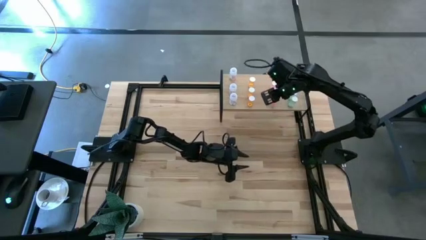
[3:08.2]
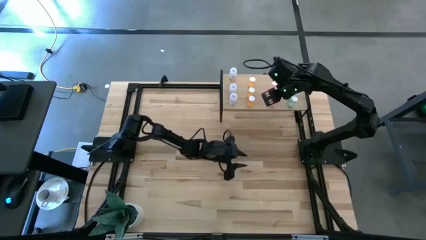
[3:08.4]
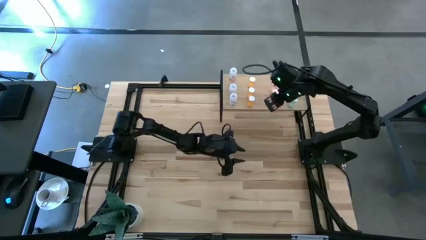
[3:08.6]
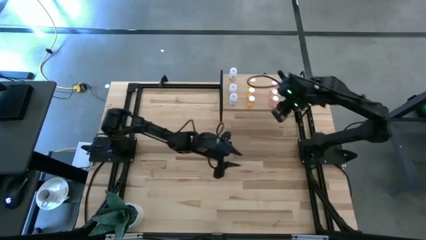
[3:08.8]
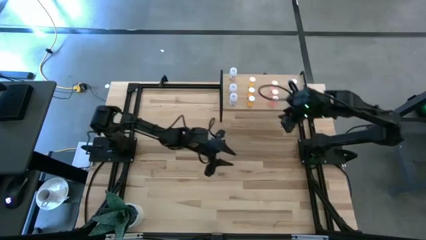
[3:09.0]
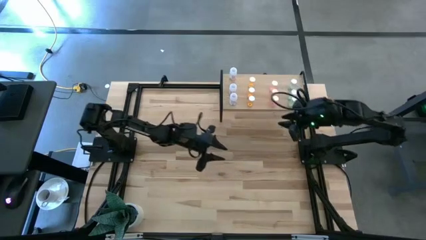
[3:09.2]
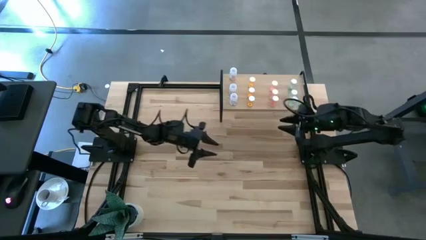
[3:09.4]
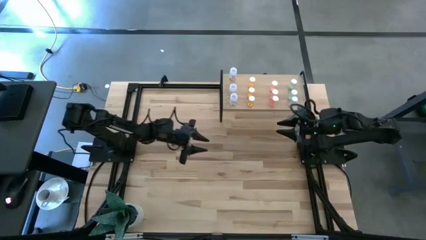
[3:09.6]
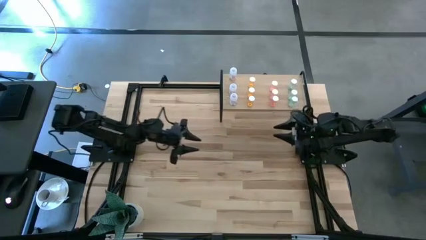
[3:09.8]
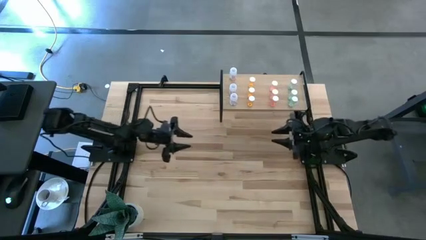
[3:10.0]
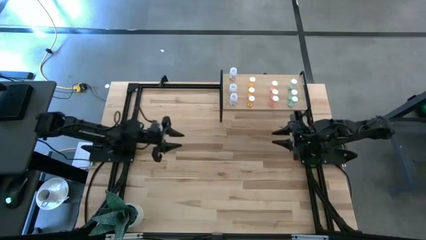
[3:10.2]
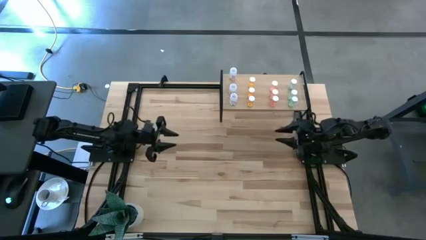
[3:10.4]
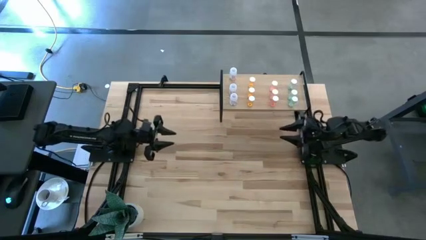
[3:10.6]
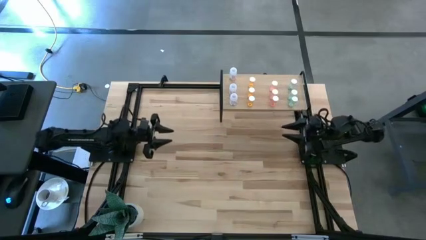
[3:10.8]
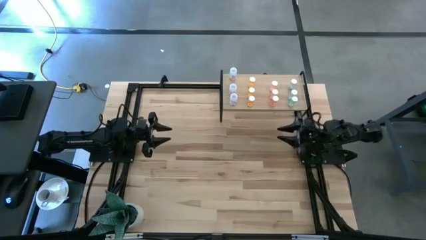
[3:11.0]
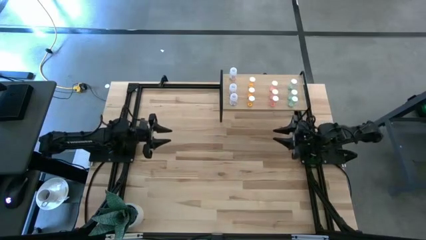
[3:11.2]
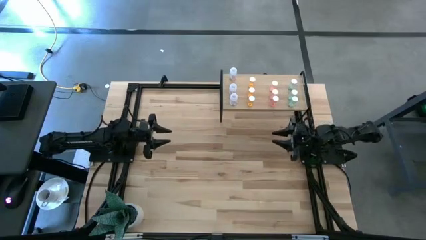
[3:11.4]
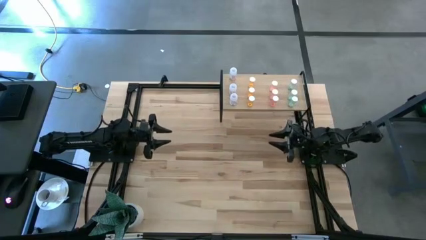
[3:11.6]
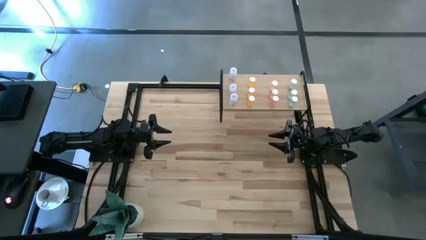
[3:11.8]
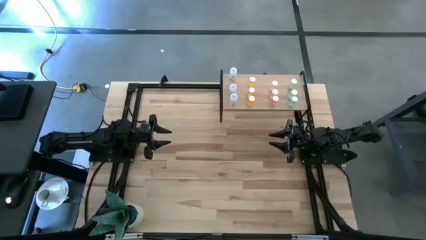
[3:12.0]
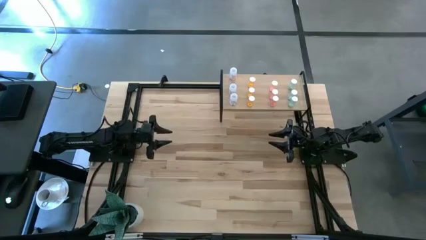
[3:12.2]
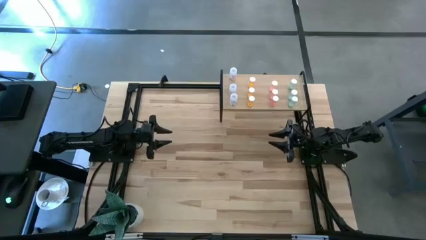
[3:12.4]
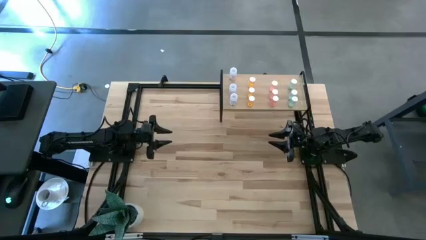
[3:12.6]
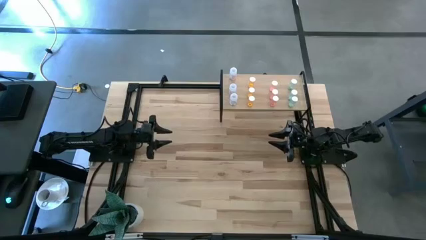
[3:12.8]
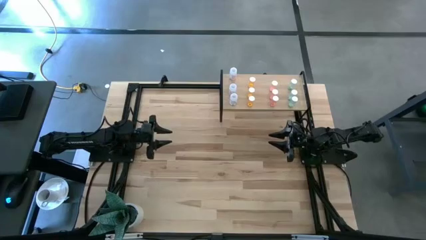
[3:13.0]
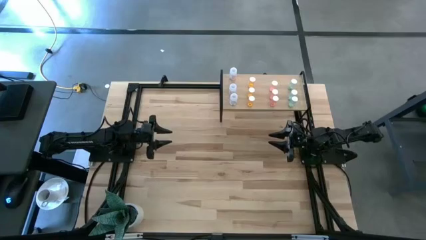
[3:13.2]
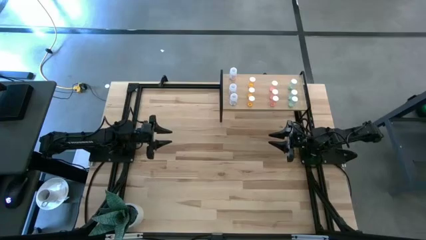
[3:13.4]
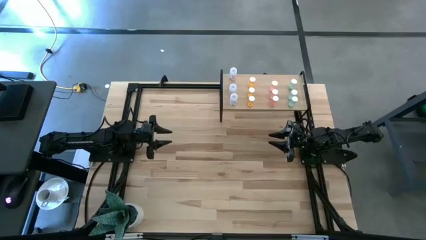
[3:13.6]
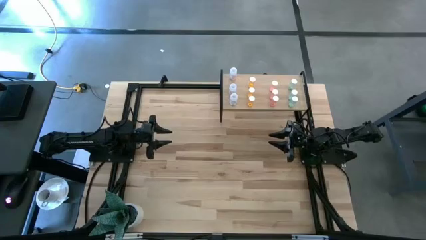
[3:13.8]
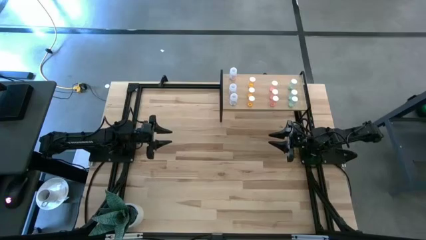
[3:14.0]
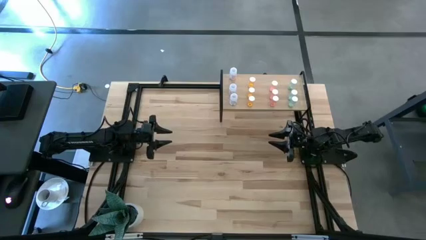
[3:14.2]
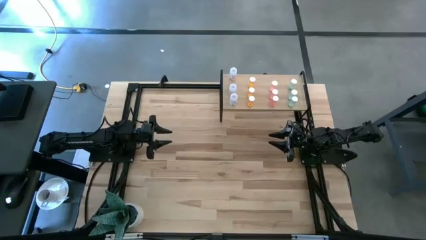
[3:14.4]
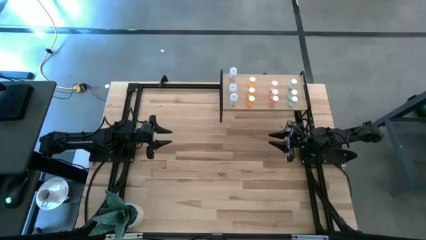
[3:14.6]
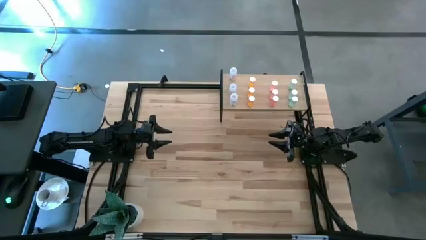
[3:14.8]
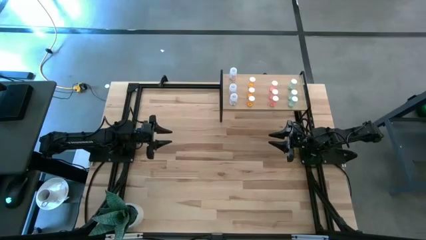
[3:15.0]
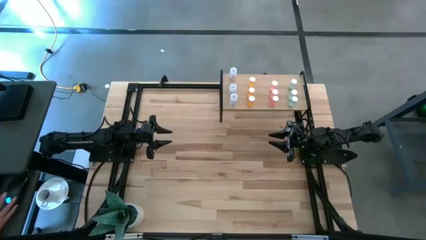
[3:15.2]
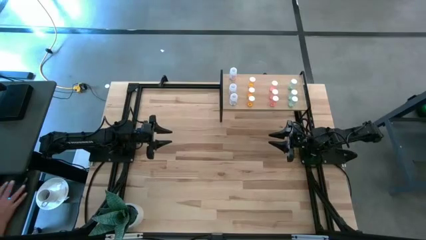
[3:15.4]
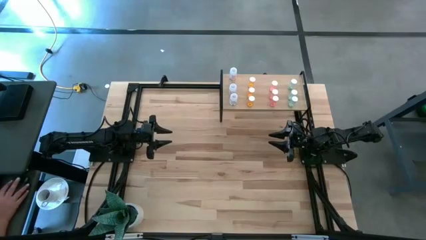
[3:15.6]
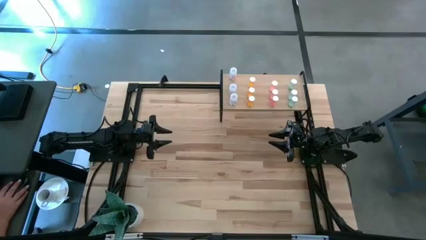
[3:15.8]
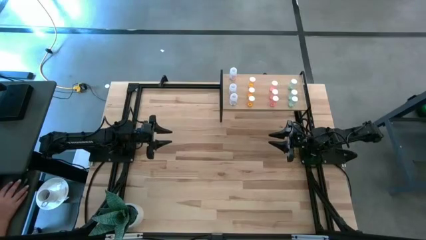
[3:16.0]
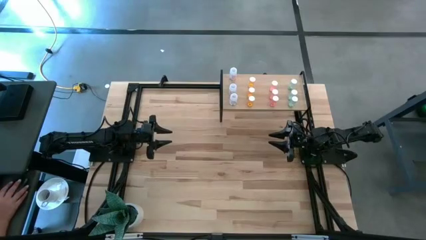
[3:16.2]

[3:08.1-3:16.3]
Task: Pick and place medicine bottles onto shelf by color
Return to Home Position
